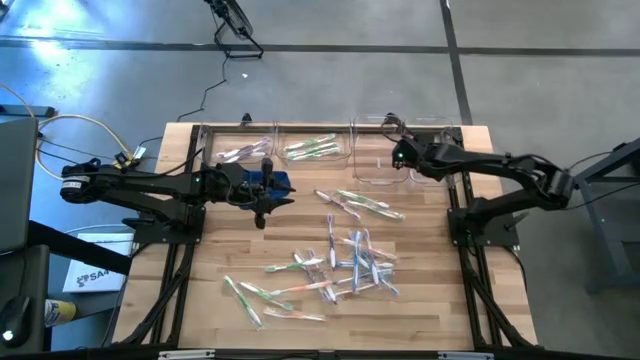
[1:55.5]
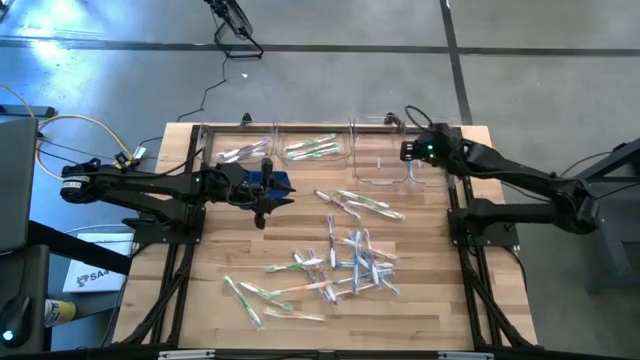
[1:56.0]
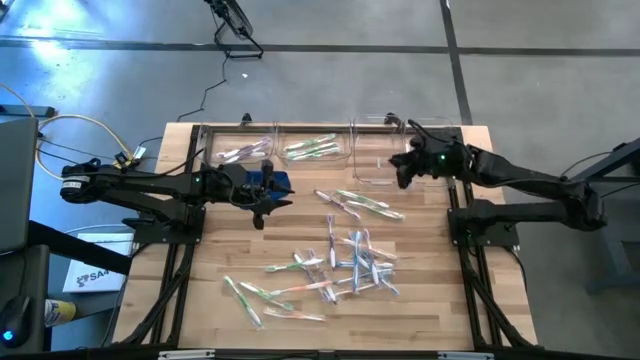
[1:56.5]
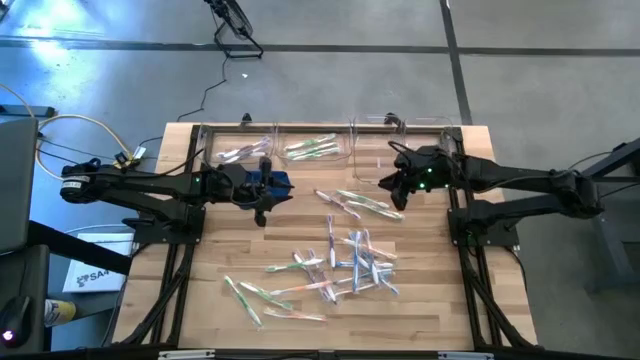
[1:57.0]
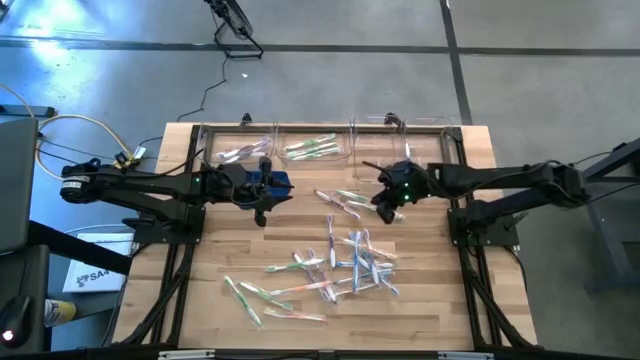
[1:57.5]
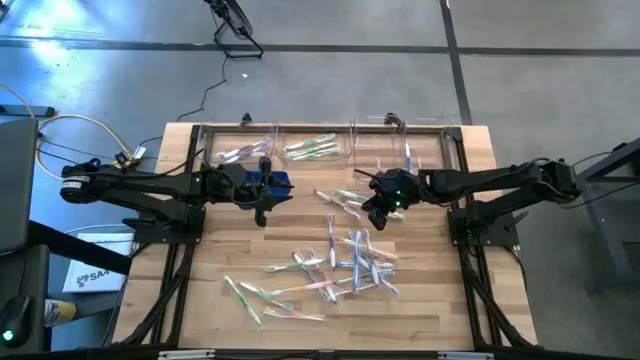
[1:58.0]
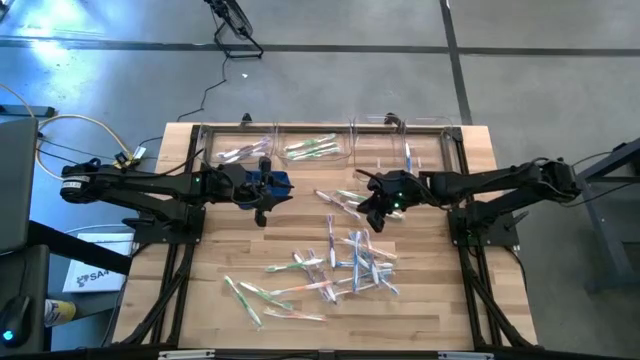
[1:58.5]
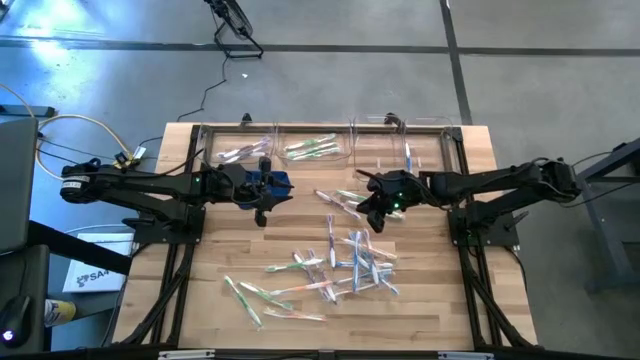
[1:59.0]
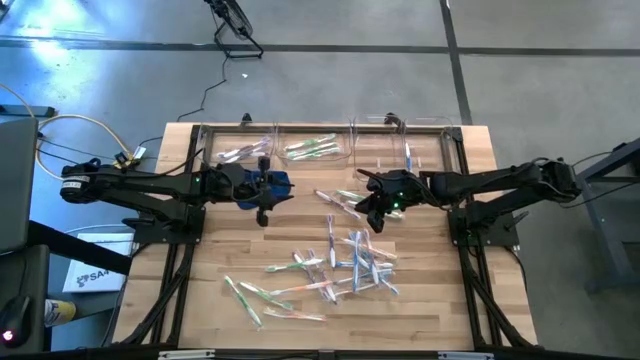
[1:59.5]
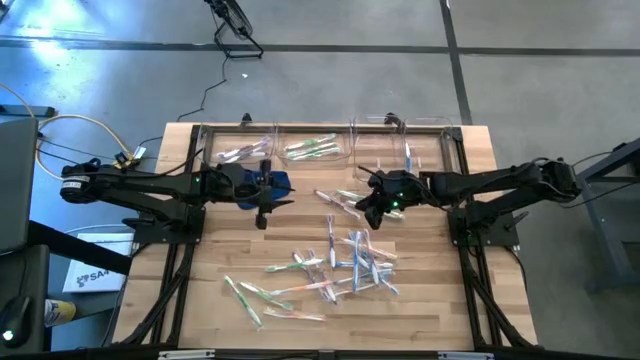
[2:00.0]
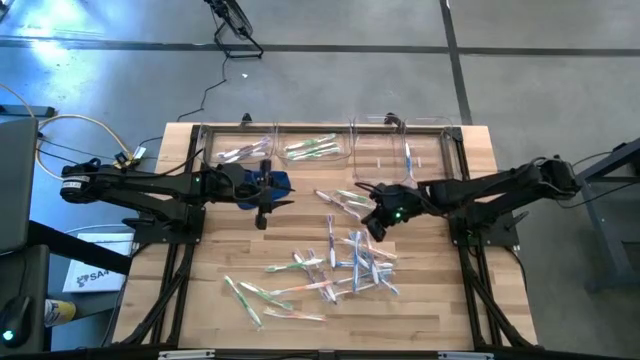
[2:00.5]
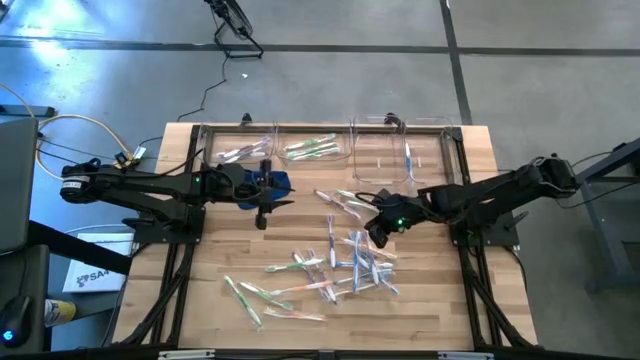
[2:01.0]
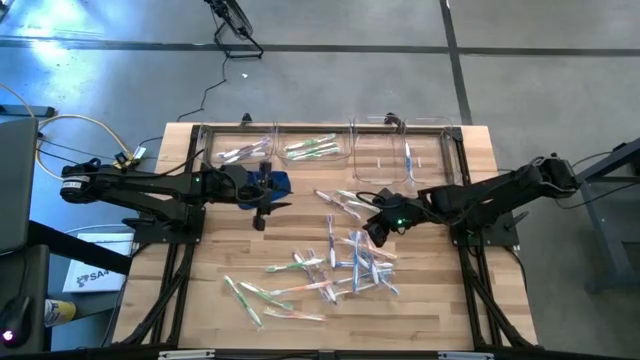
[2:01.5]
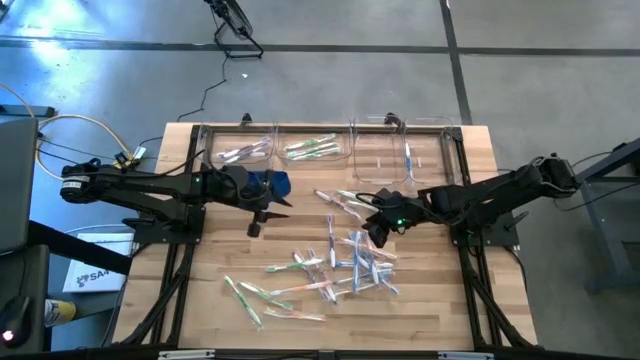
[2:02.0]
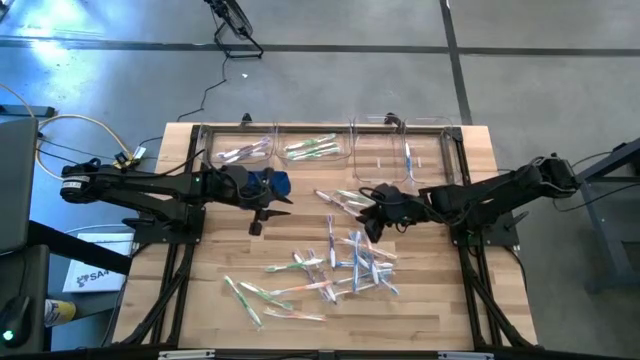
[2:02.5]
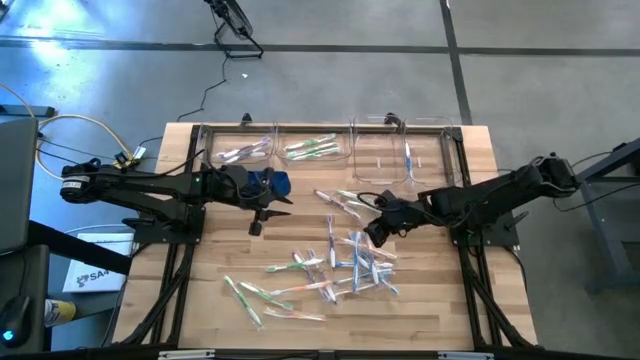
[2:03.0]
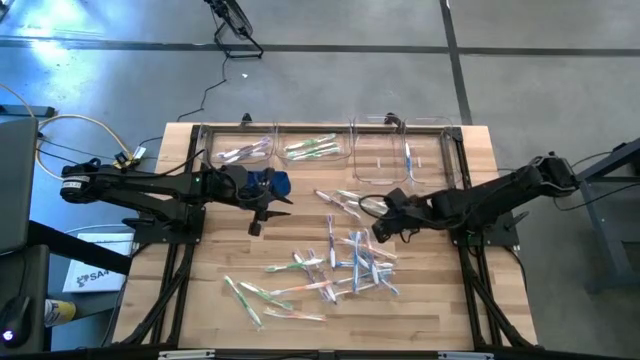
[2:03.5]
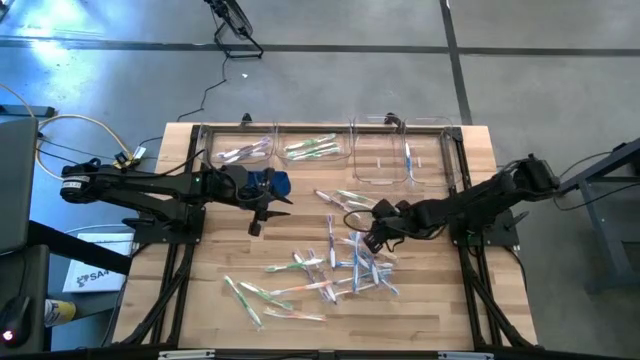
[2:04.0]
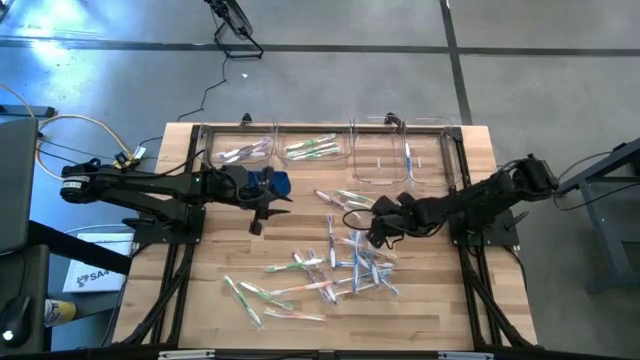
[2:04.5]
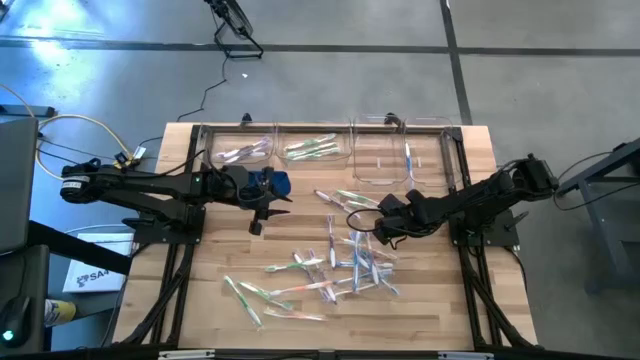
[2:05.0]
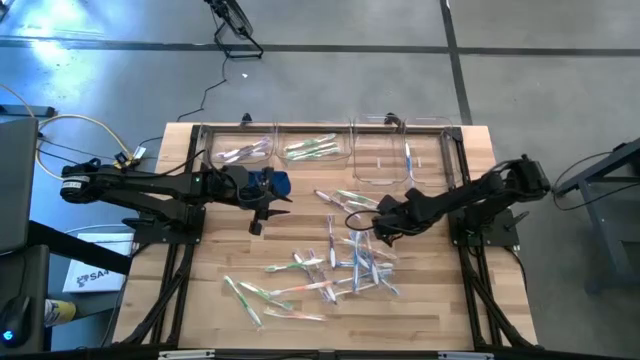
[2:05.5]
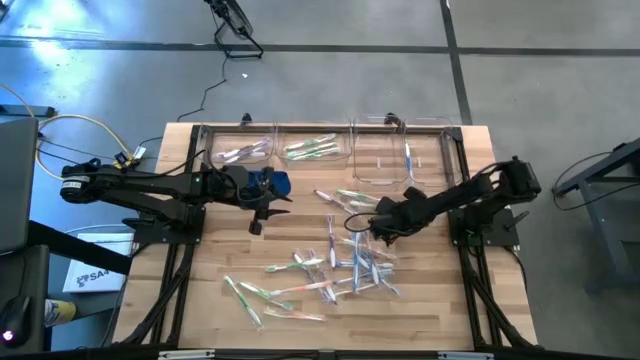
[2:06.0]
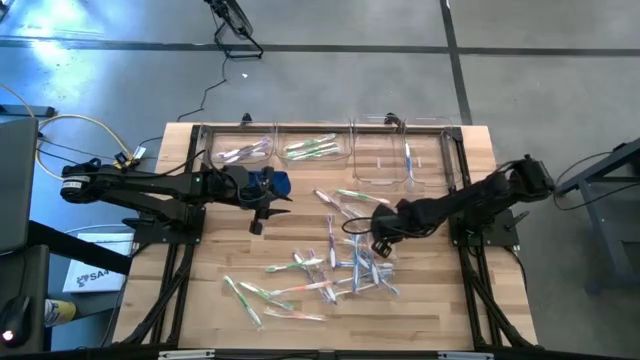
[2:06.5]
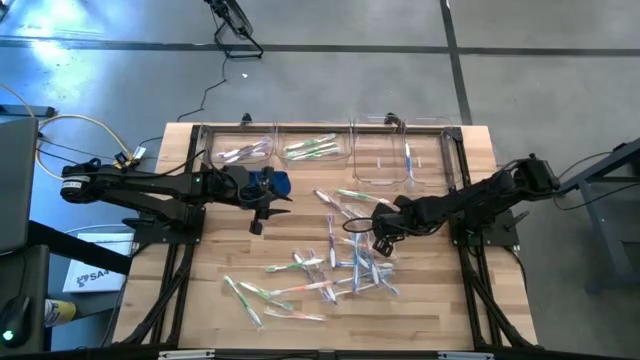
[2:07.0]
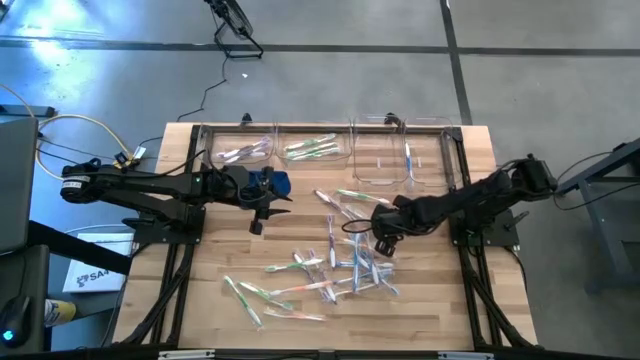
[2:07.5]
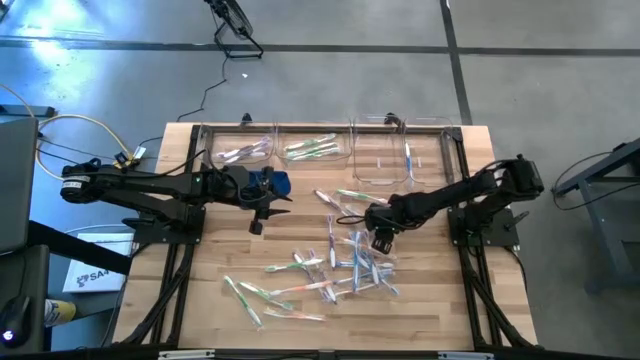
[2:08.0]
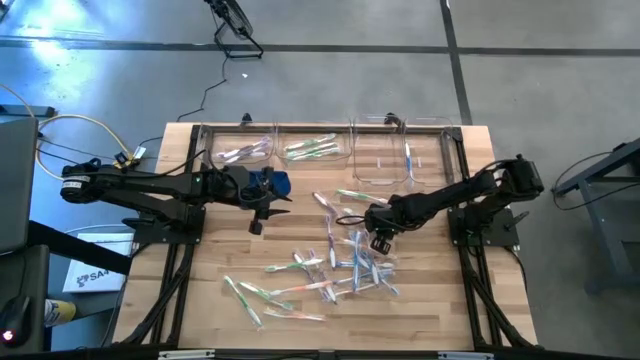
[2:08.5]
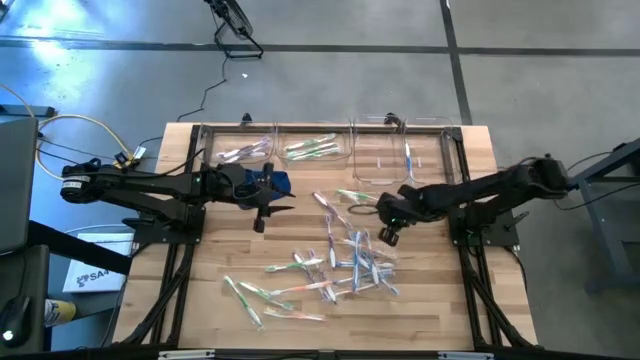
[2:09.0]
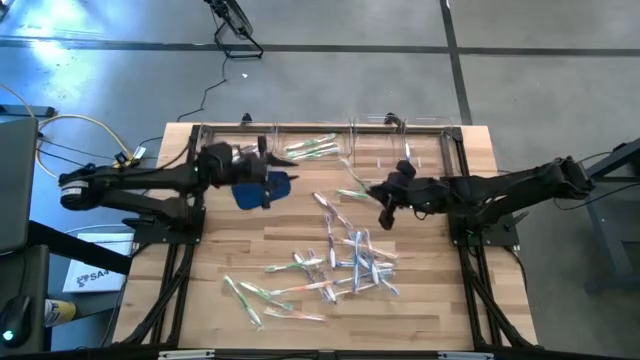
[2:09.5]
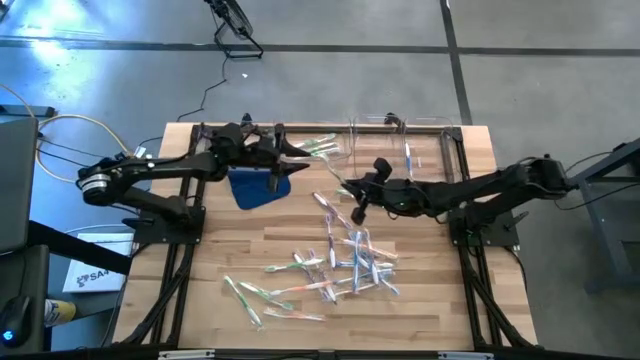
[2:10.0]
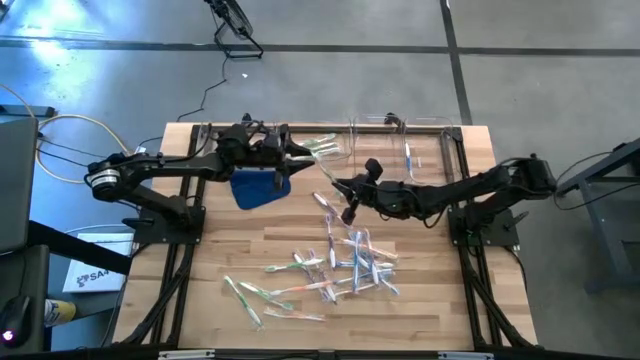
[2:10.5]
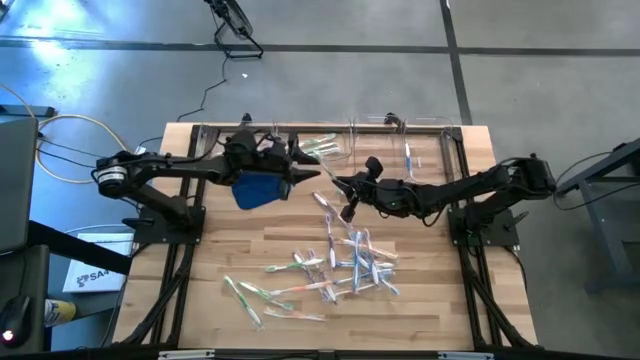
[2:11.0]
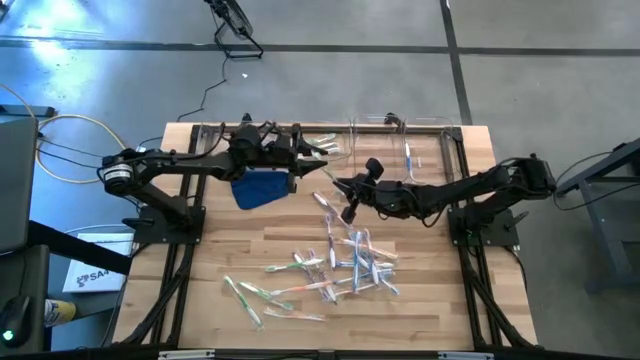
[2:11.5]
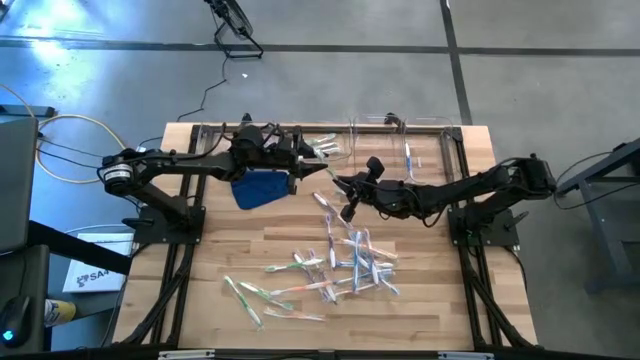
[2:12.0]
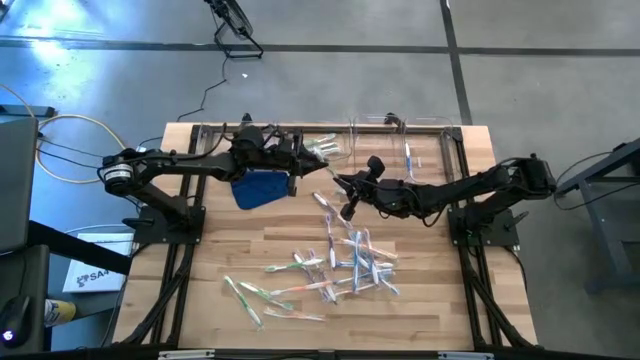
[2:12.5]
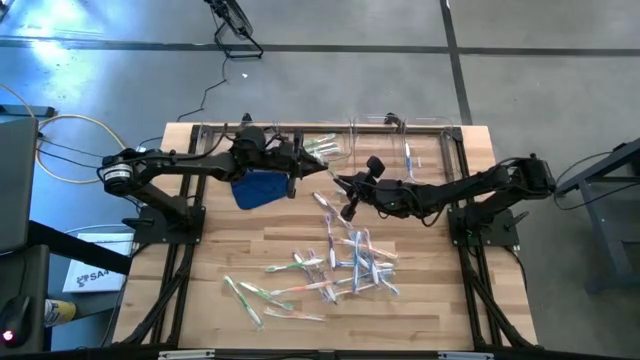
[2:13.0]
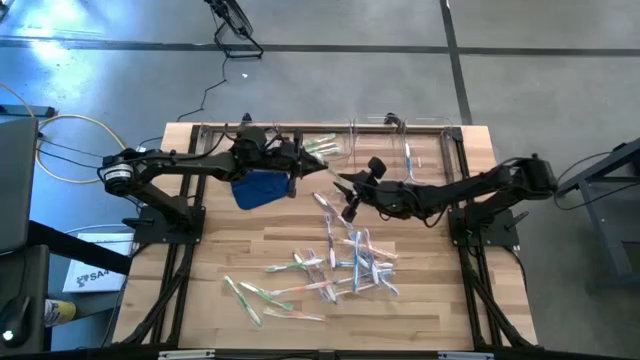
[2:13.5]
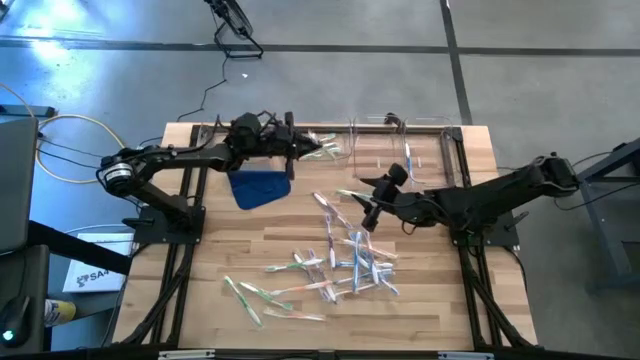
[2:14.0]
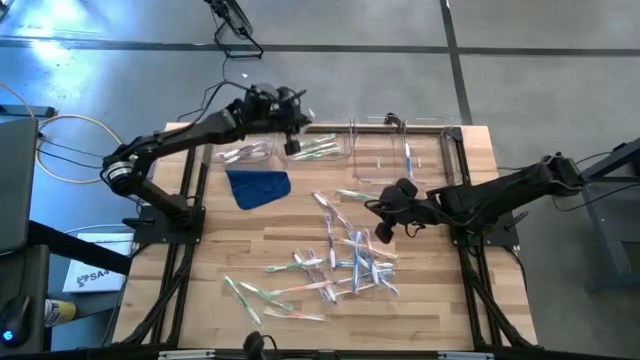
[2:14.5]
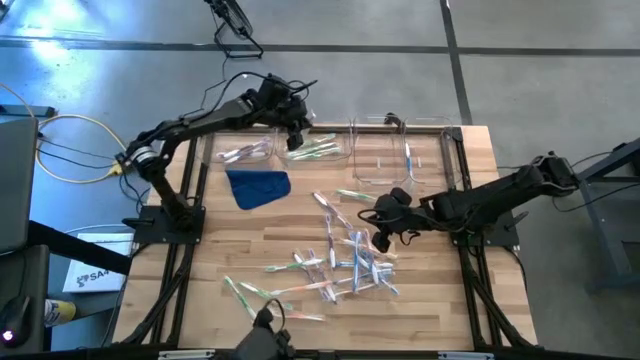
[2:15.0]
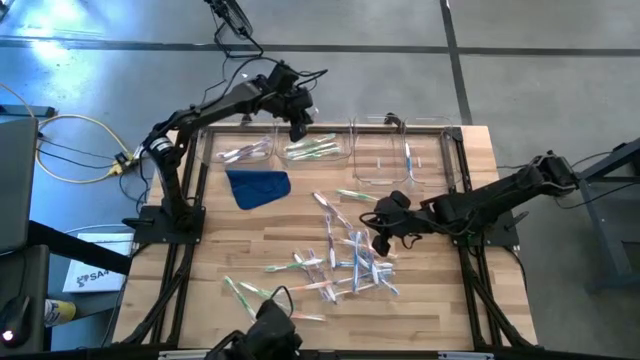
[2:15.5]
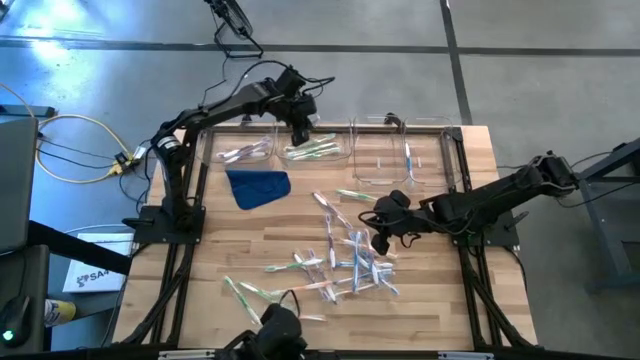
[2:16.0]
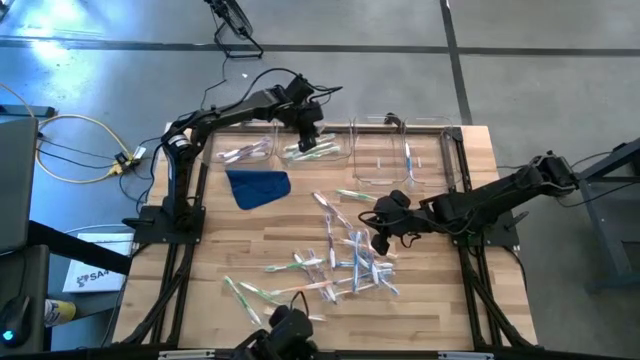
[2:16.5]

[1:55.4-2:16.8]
Task: Pick & Place Toothbrushes
Put the green toothbrush into the middle left transparent bin
